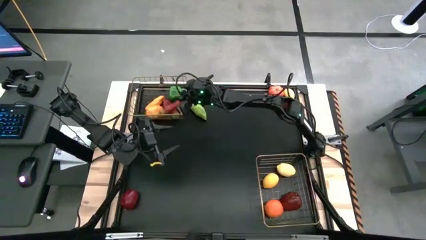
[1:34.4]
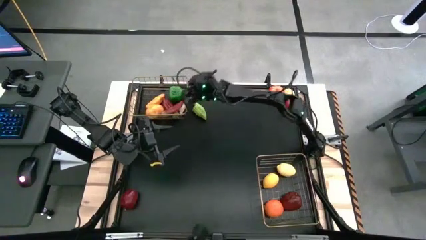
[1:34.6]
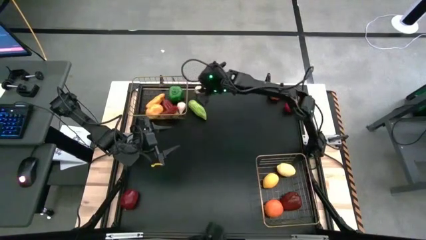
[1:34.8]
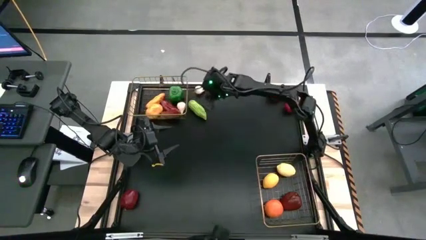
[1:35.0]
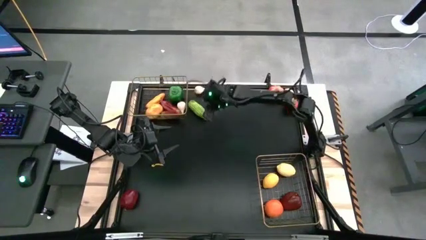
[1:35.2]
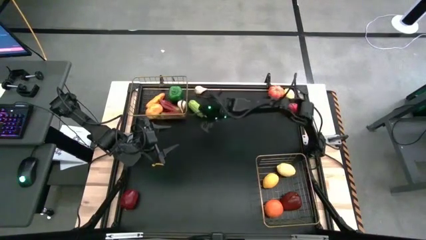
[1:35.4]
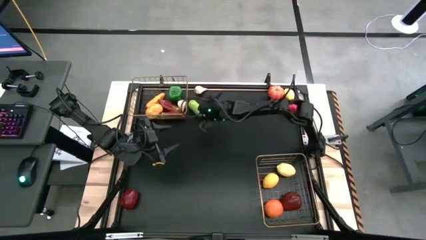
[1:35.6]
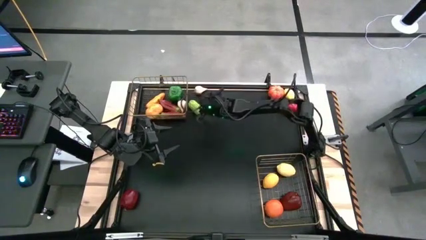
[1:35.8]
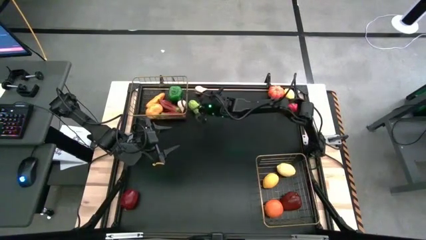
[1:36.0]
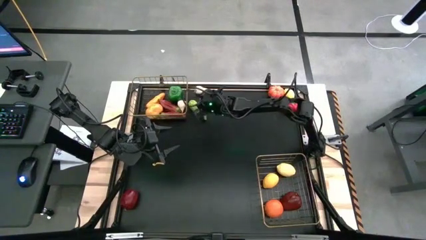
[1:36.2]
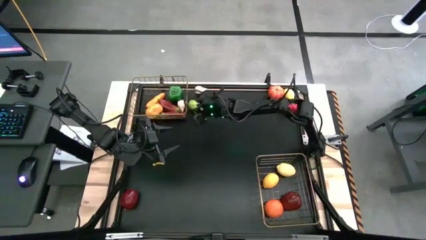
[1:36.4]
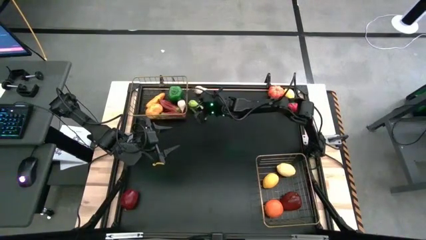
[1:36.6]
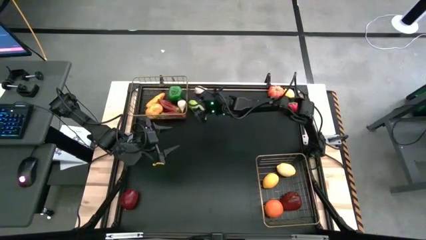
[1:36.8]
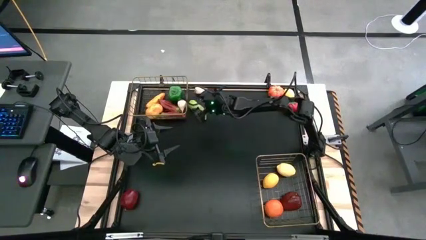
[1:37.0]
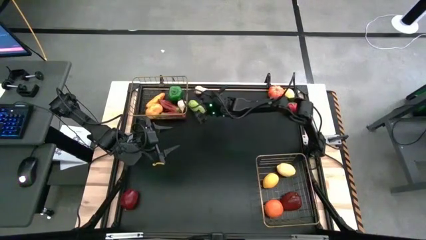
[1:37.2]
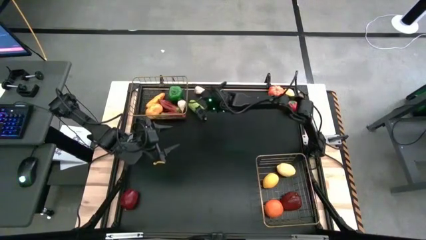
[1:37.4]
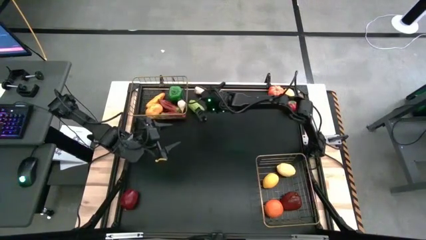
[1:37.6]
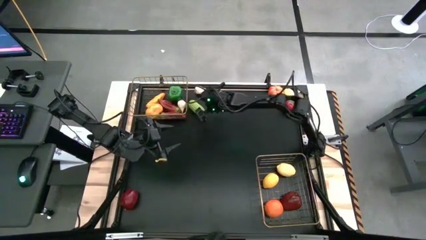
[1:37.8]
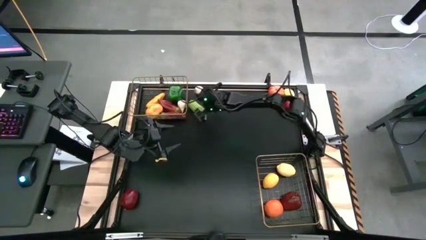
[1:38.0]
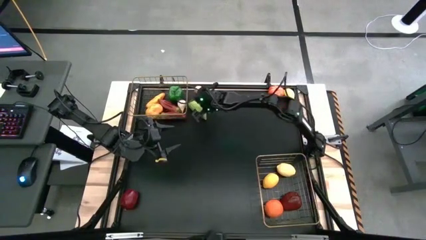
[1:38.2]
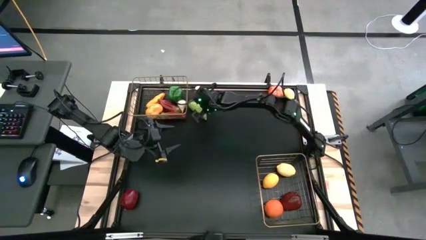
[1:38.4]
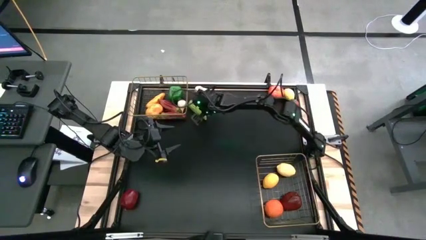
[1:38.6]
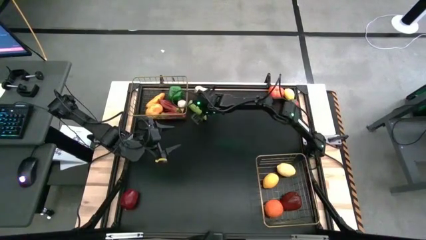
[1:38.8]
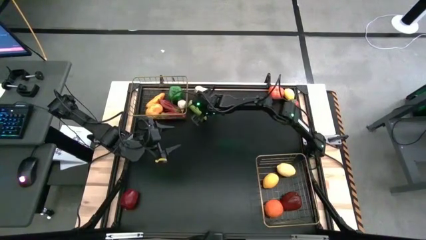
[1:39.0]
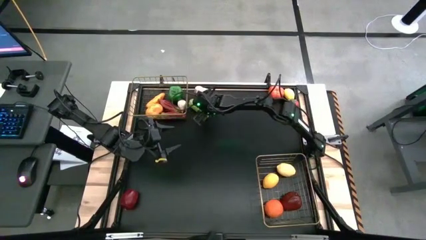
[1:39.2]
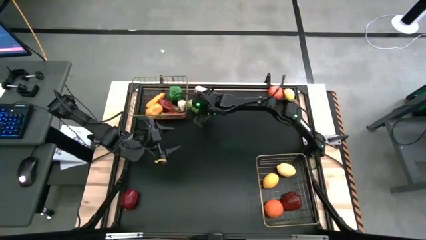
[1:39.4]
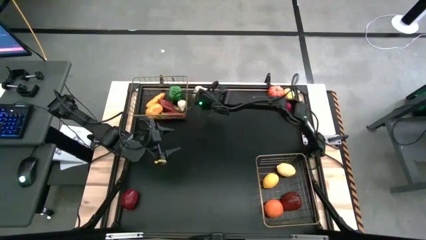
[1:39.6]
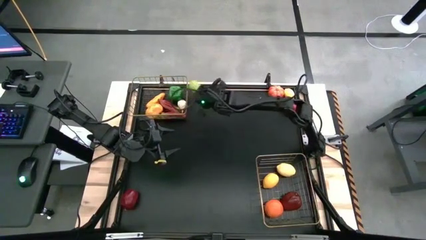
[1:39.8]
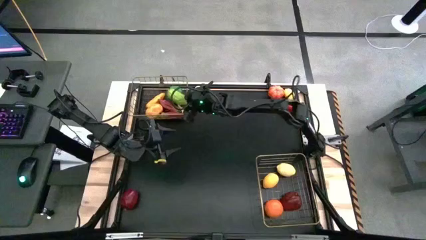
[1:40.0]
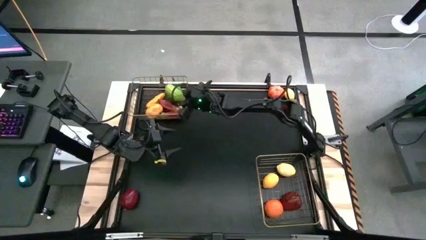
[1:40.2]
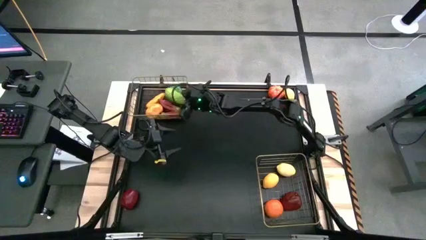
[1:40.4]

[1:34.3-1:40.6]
Task: Sort produce into baskets
Put the green cucumber into the top wire basket

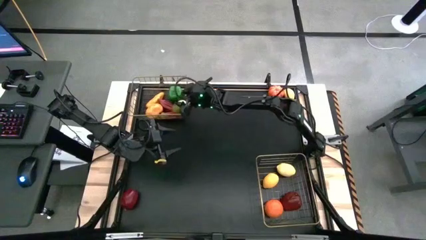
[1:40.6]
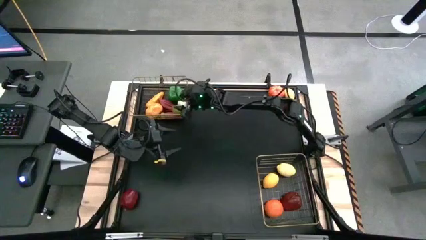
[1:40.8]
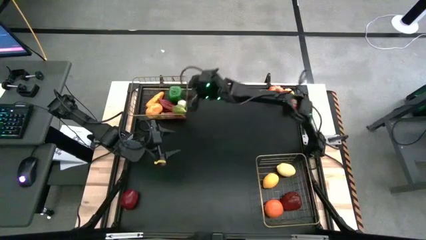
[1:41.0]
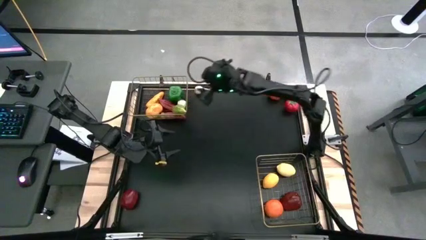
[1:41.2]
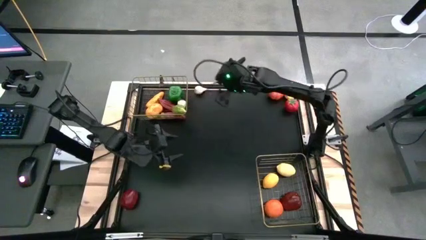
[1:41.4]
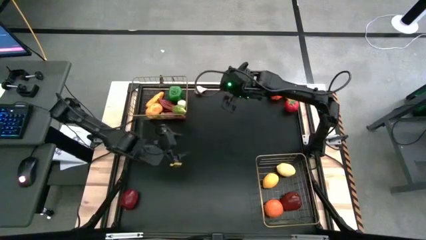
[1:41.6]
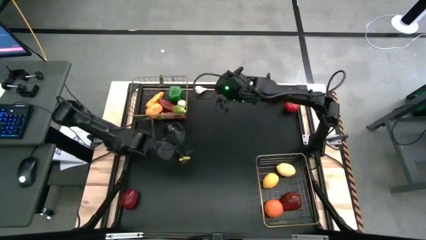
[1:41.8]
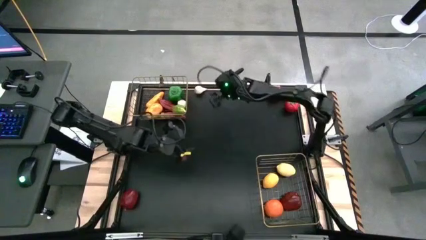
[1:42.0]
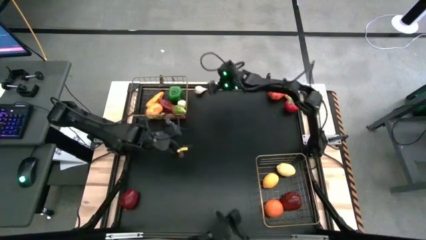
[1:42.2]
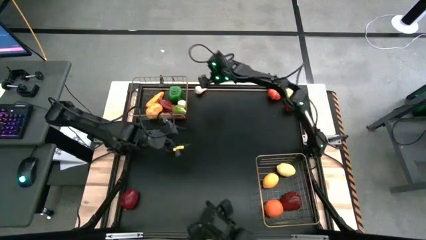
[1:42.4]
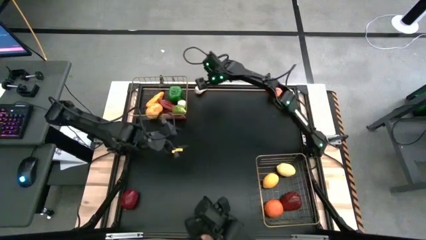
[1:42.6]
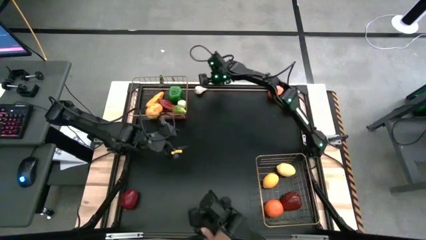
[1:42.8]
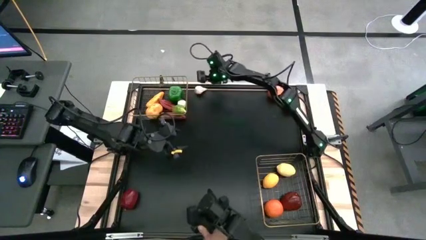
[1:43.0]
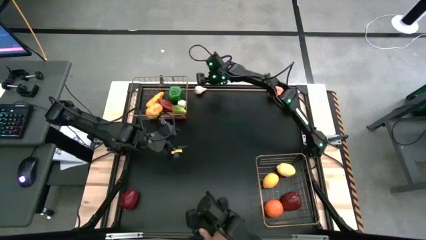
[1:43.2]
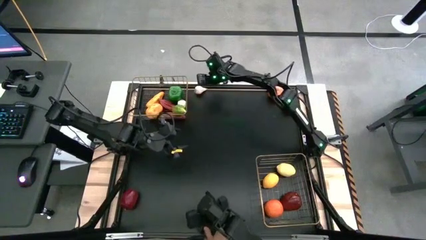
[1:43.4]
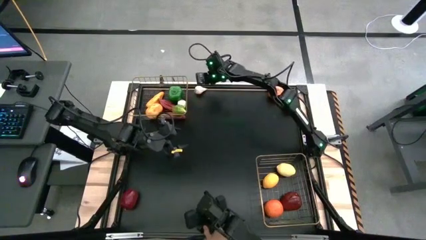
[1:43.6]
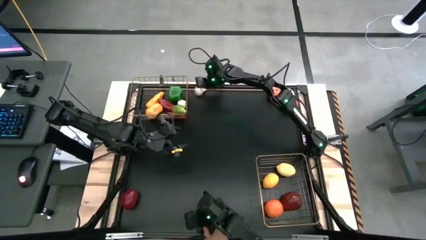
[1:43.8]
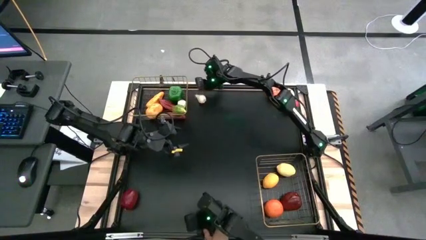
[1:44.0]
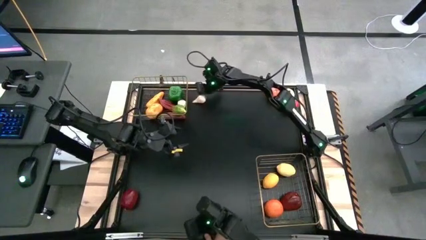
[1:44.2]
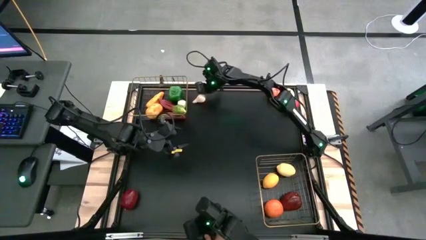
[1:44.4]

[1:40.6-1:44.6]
Put the white garlic into the top wire basket

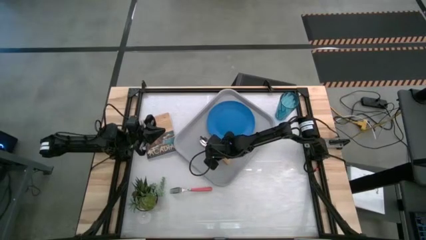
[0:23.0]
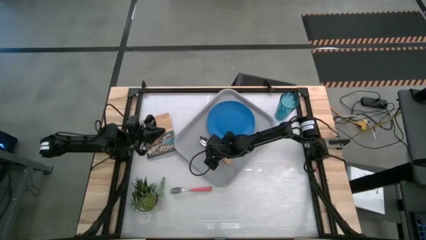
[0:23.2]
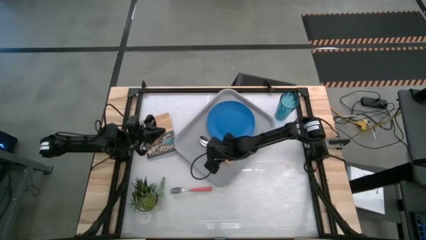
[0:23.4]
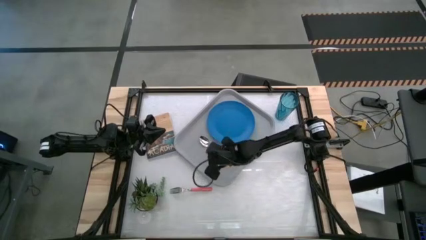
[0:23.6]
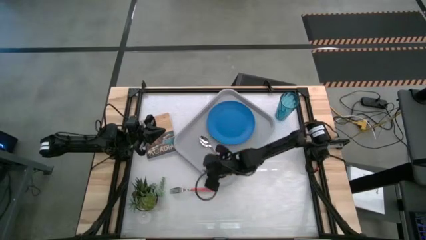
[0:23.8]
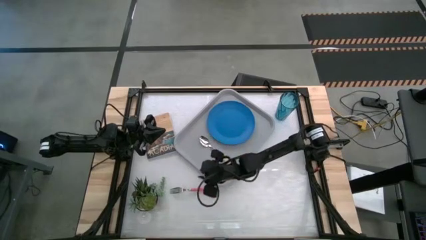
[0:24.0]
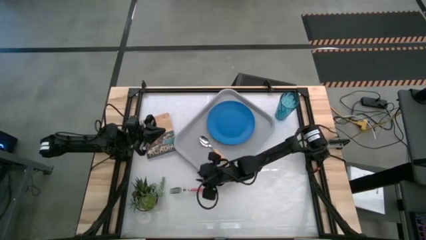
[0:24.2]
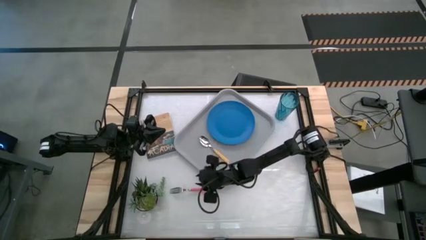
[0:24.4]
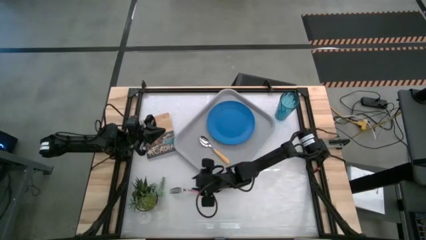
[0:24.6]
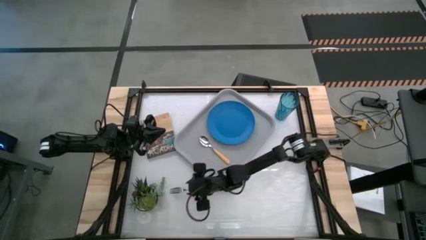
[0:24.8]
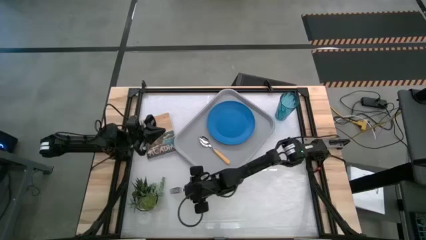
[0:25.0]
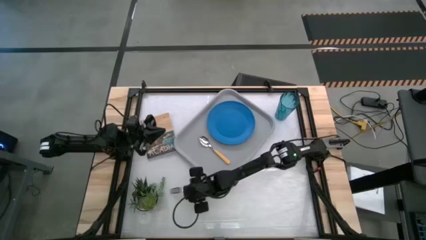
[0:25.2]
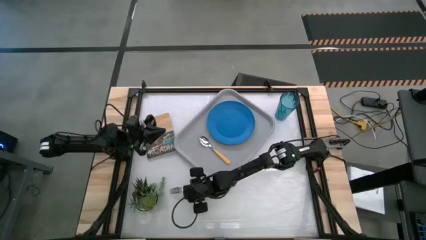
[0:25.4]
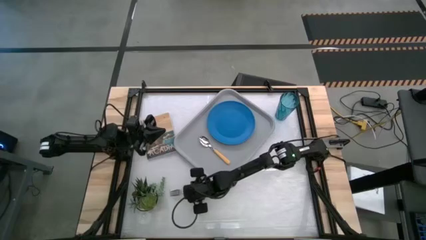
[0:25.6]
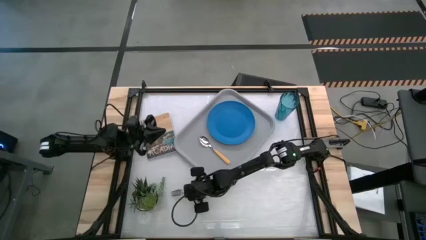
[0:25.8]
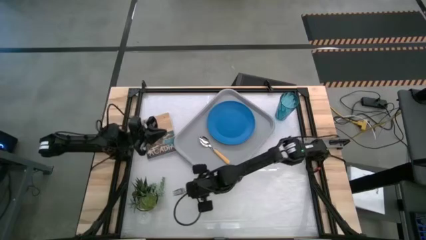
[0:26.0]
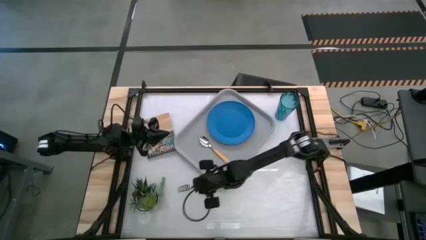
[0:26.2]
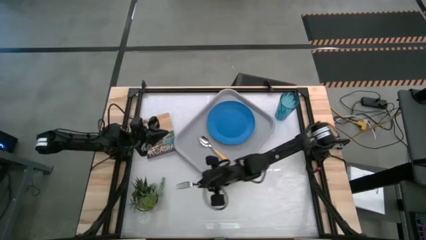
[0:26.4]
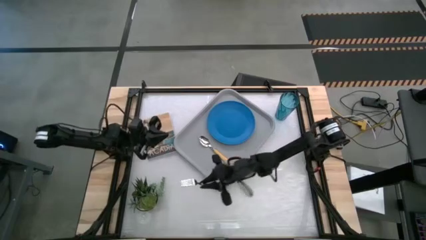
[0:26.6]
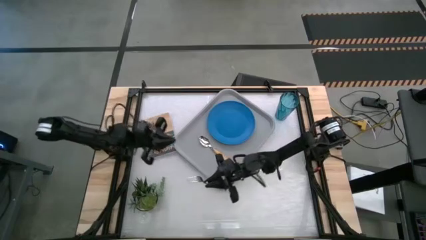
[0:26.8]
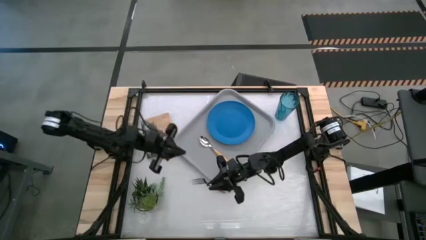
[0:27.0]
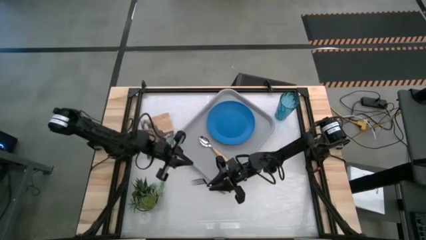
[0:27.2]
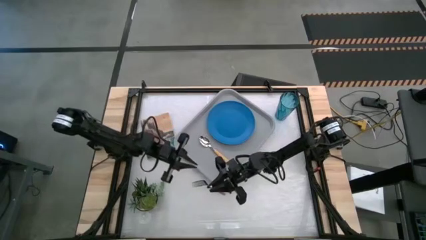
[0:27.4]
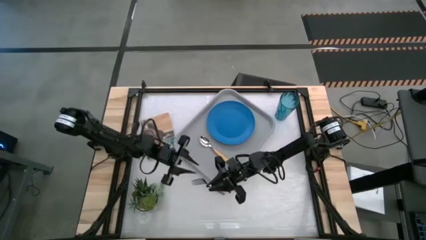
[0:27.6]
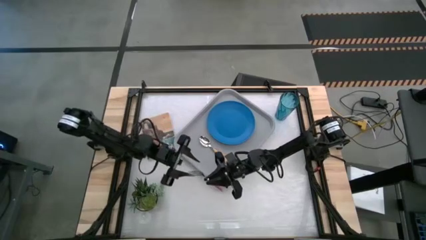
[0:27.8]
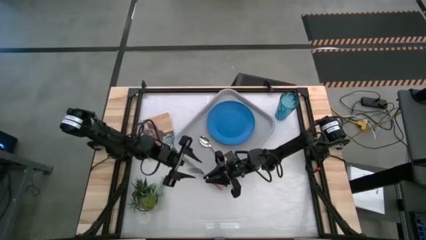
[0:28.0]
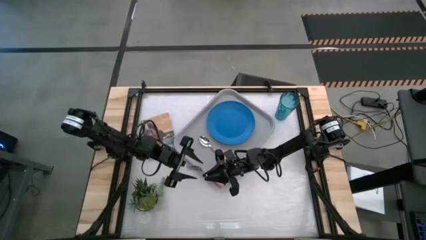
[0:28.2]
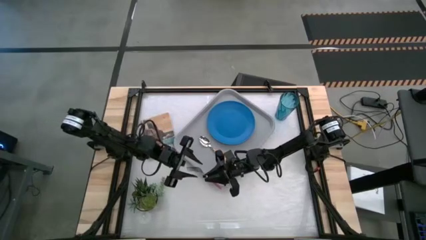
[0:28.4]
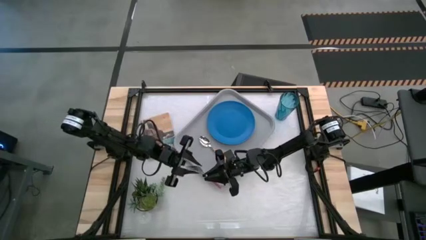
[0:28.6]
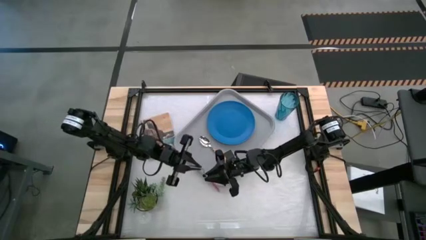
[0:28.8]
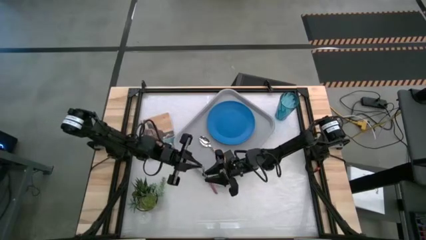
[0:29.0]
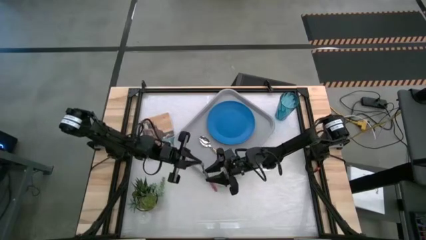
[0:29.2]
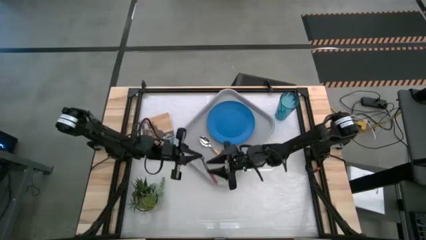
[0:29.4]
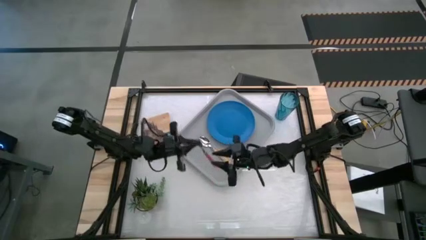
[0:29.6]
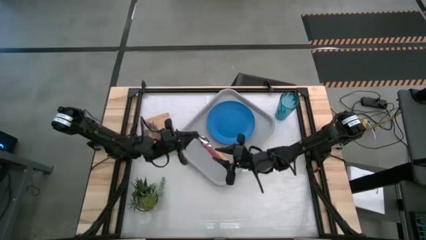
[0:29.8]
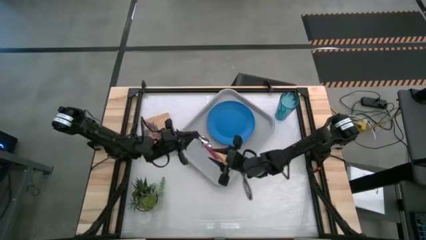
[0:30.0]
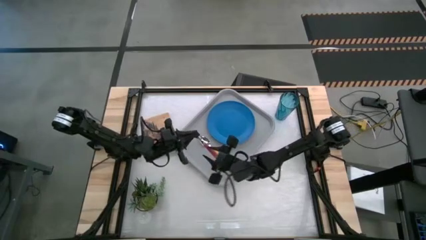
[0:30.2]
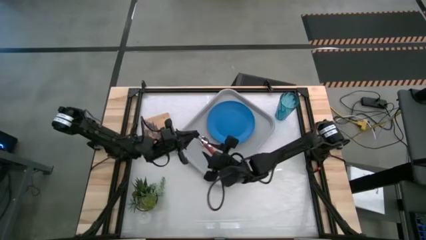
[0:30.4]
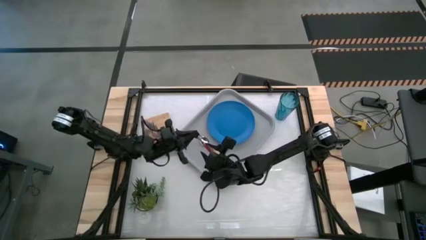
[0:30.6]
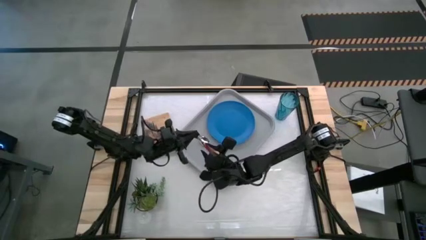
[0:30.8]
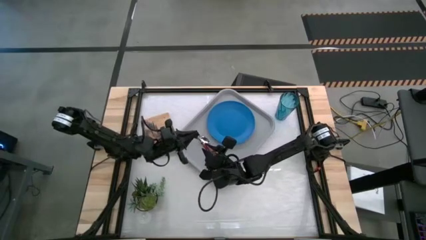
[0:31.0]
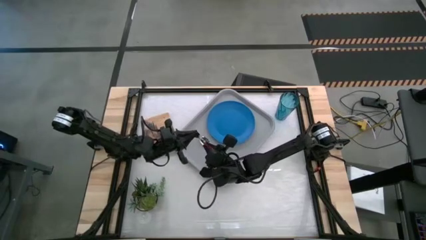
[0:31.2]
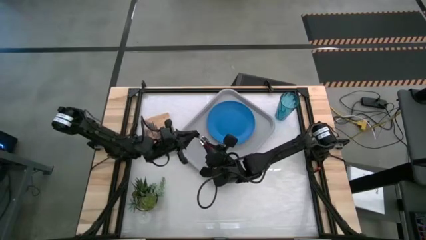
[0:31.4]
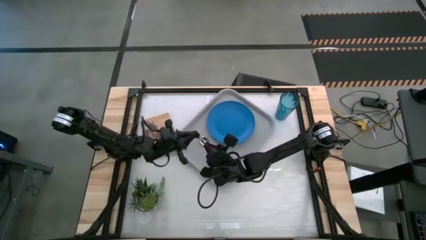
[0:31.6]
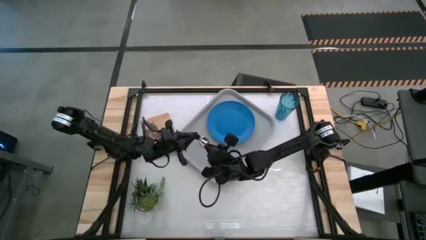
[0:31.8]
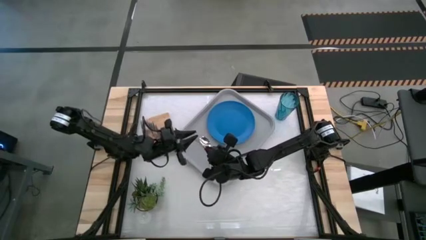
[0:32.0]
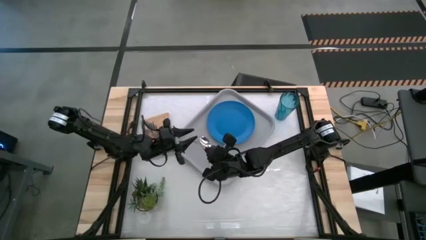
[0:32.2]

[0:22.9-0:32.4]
Task: Pick and place plate/cup/fork/spoon on tray
Put the pink fork on the gray serving tray to the left of the blue plate
